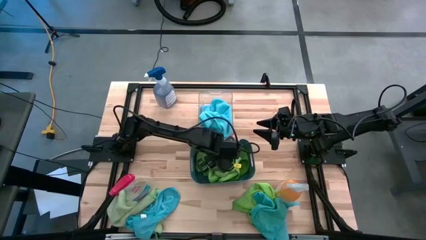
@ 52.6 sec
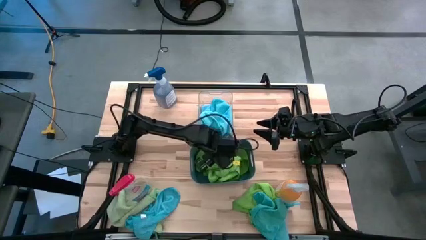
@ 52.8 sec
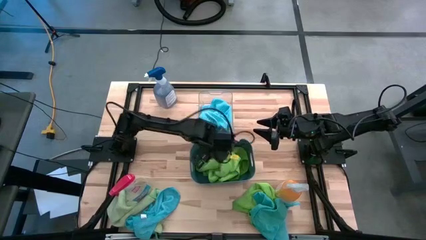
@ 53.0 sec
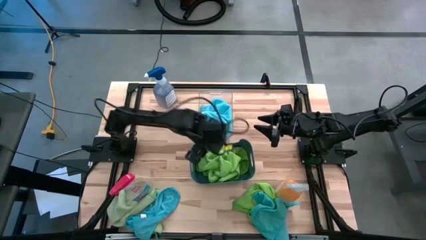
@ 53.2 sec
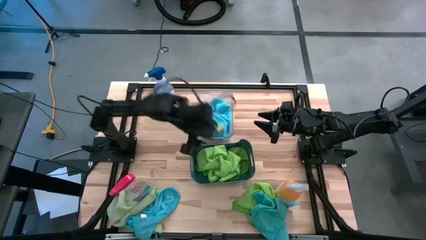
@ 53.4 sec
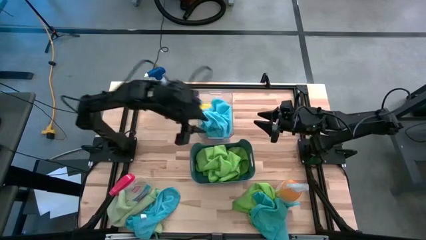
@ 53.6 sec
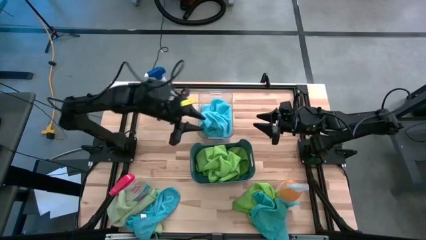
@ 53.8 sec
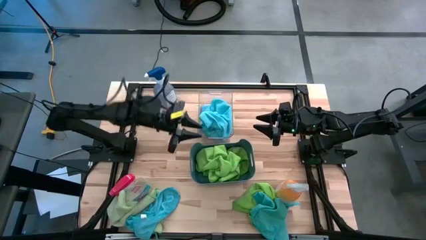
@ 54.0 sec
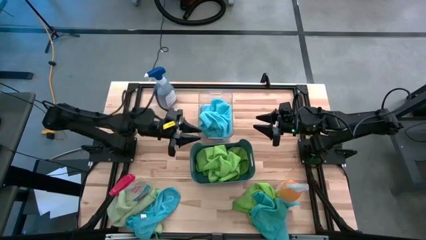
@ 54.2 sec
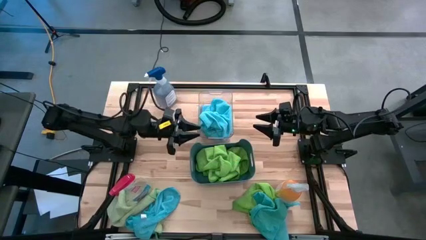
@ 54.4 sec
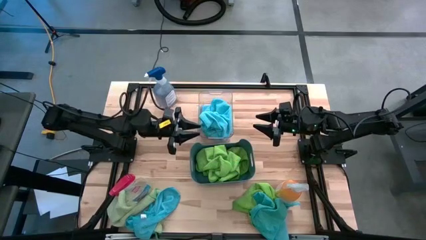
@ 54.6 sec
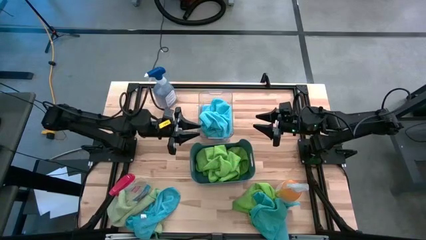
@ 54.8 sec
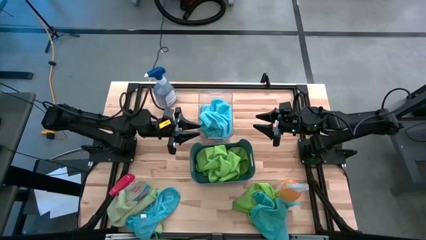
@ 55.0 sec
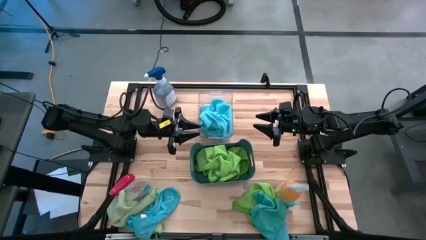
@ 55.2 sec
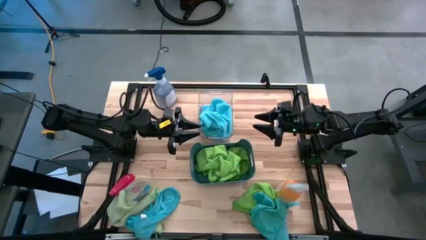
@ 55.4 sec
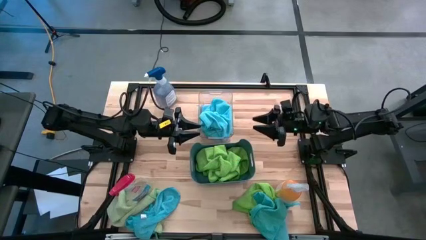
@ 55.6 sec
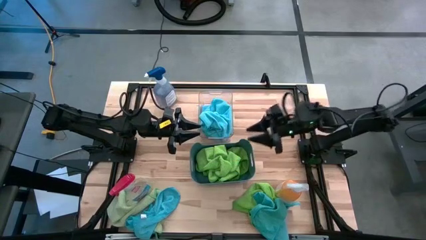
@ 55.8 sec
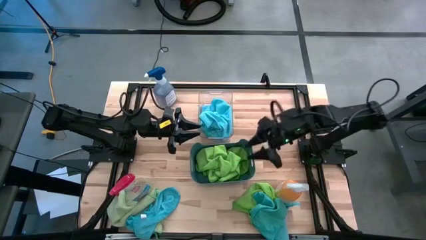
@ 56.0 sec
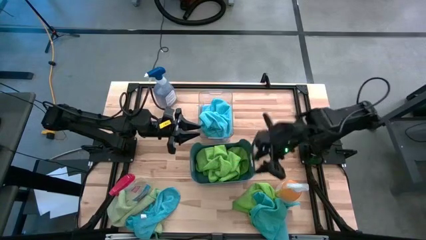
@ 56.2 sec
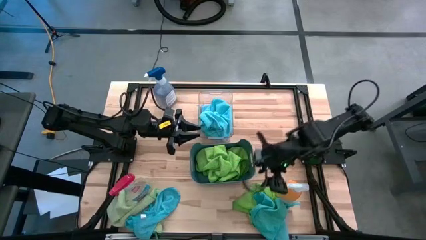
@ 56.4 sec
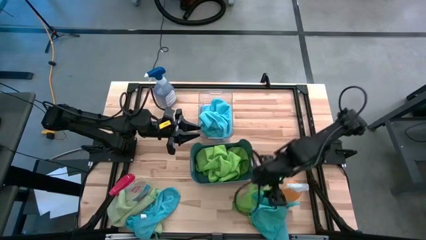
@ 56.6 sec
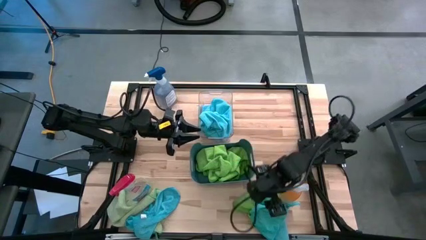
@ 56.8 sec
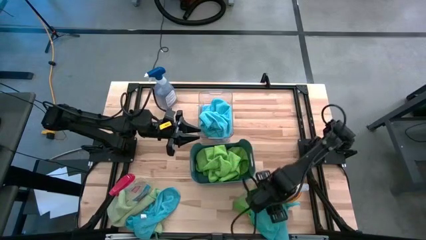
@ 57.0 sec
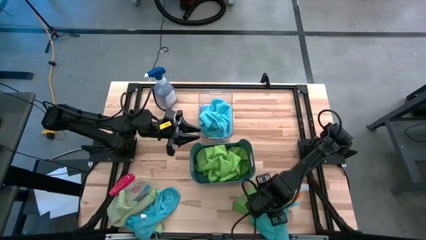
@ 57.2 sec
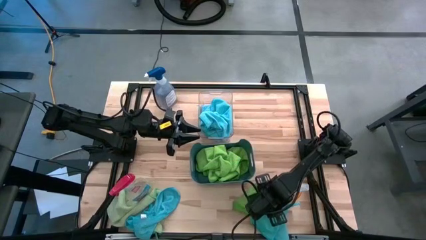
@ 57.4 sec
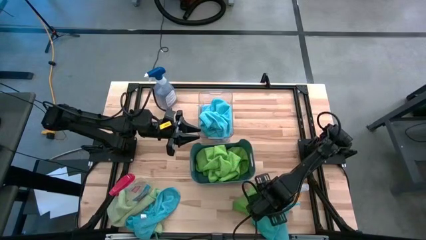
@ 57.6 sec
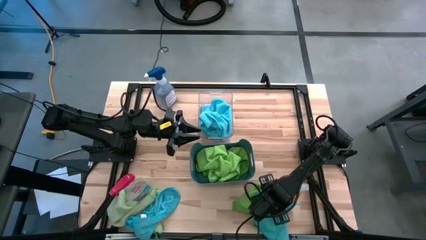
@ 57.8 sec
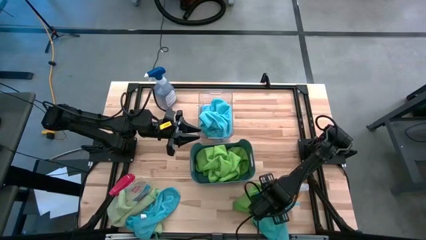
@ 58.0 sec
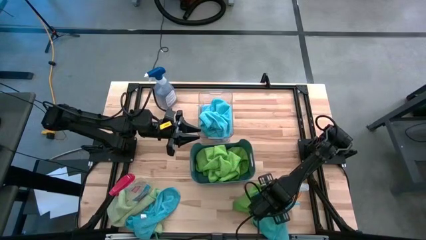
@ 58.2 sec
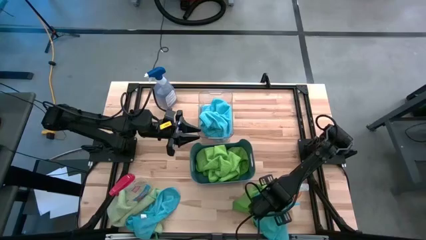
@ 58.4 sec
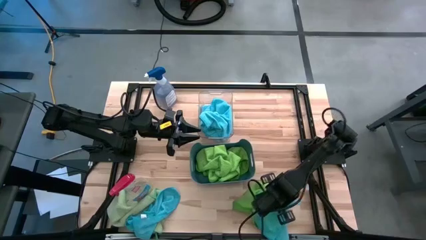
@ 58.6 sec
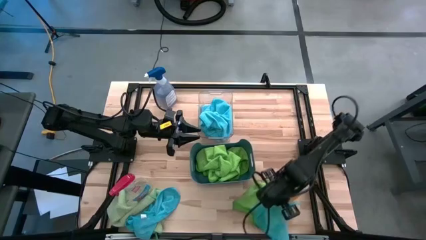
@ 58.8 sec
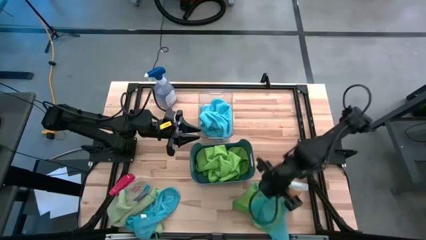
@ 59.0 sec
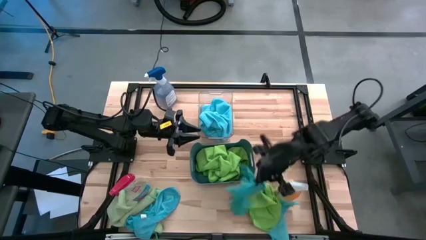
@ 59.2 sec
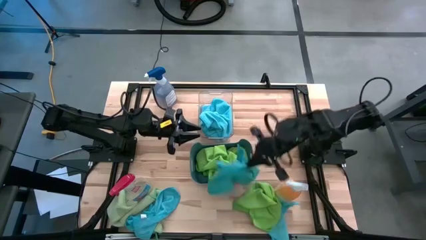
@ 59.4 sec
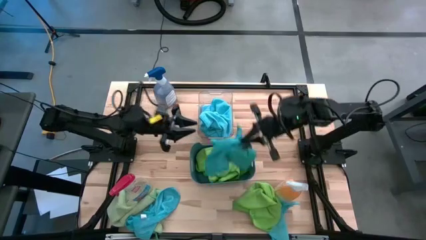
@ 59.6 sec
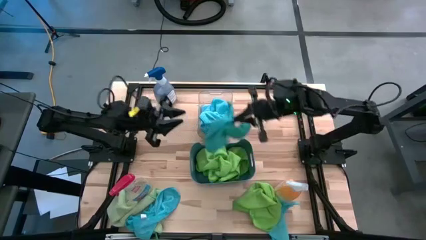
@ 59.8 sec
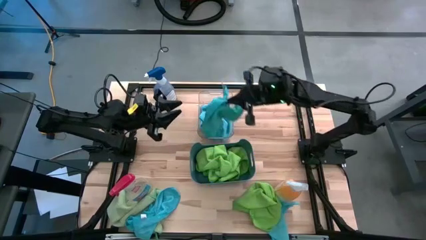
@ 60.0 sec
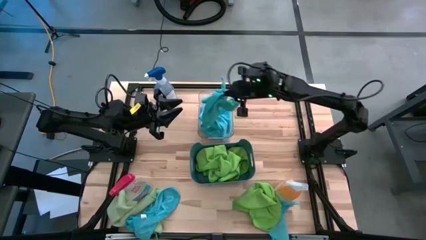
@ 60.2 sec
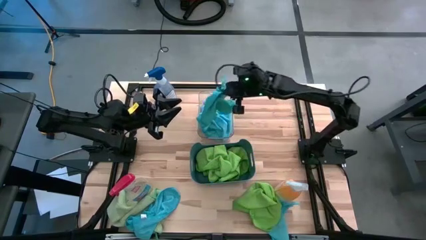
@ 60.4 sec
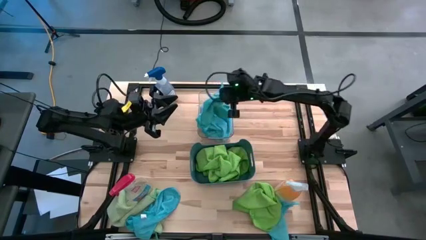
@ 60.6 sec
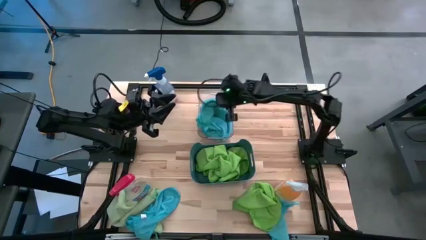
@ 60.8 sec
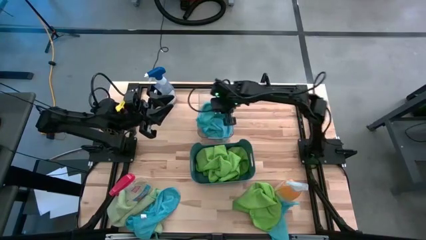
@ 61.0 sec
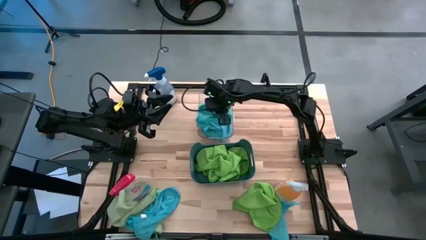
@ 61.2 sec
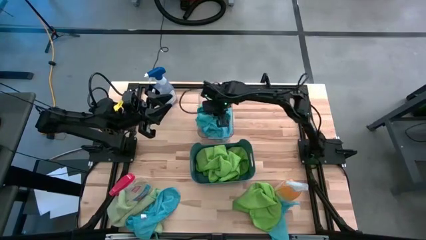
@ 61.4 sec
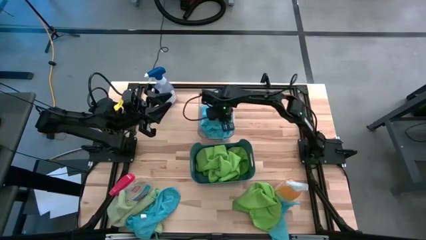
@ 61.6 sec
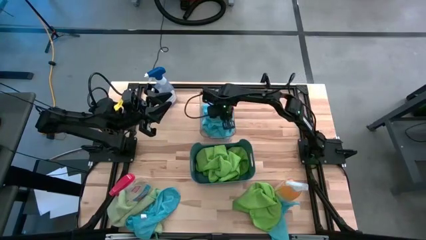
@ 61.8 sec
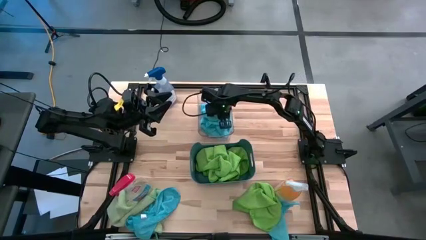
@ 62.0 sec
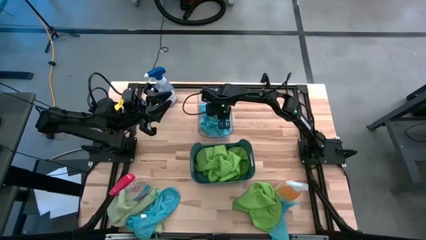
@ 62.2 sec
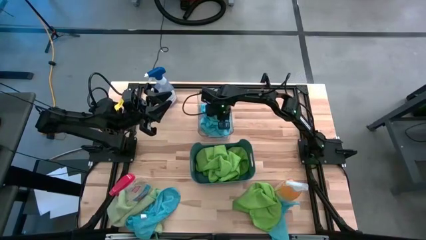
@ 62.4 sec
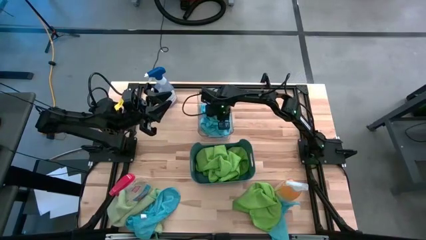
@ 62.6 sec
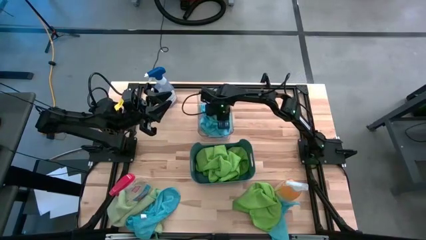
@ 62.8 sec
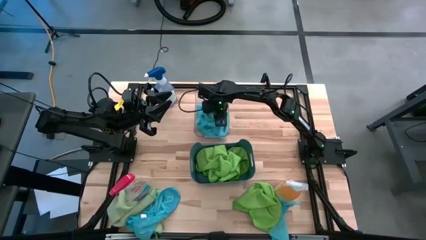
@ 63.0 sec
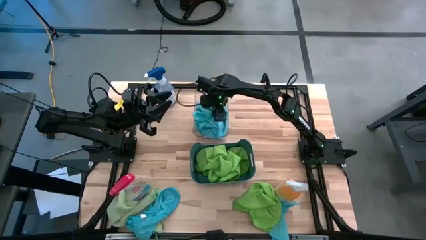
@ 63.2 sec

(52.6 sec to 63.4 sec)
Task: Sort microfiber towel by color & place in baskets
Put the blue microfiber towel into the transparent bin

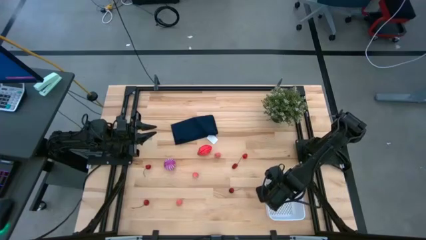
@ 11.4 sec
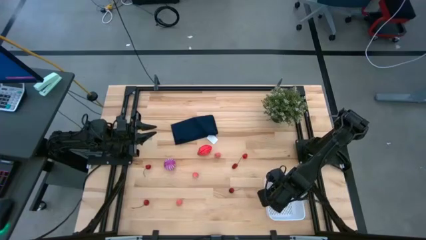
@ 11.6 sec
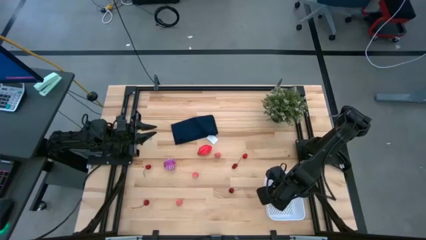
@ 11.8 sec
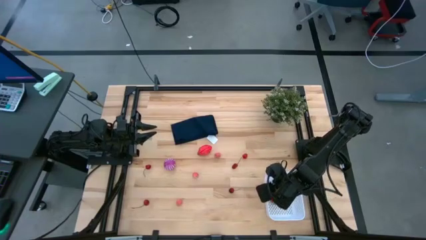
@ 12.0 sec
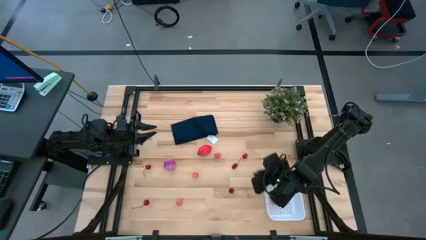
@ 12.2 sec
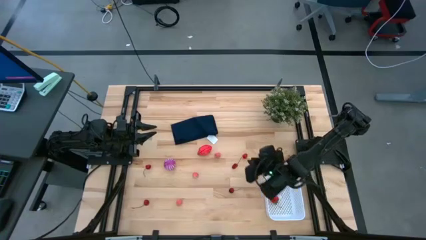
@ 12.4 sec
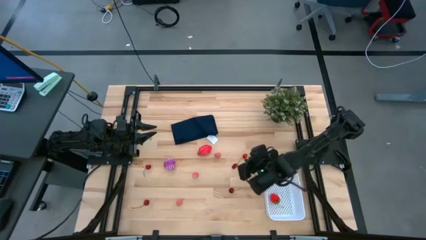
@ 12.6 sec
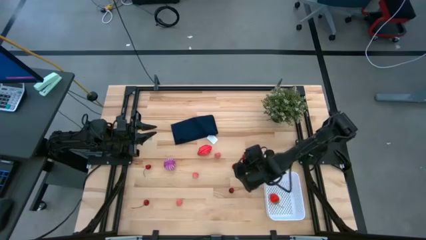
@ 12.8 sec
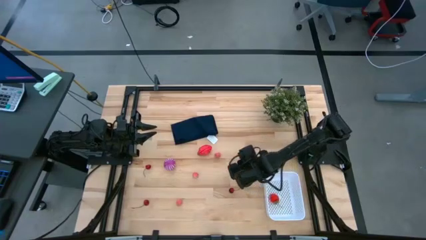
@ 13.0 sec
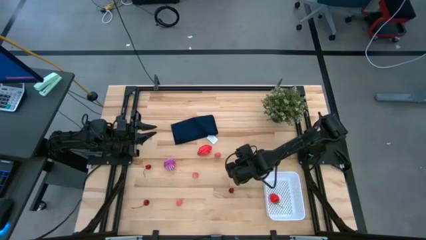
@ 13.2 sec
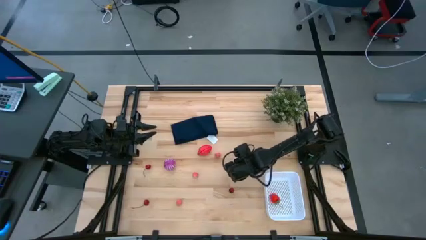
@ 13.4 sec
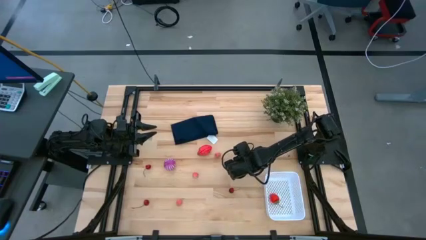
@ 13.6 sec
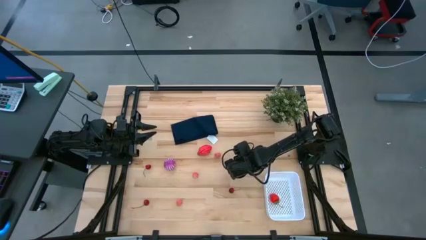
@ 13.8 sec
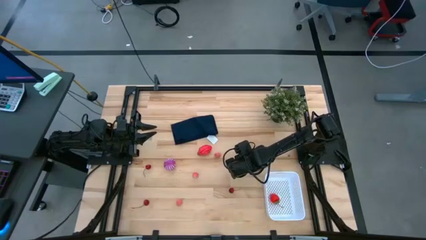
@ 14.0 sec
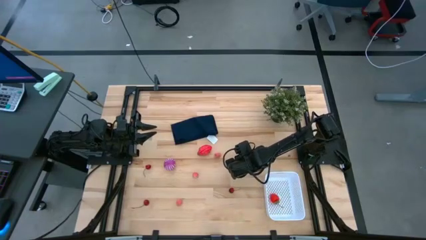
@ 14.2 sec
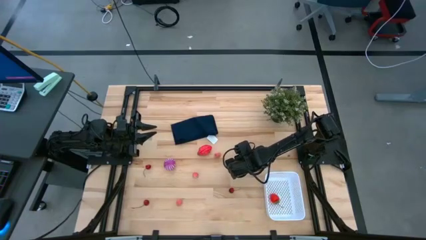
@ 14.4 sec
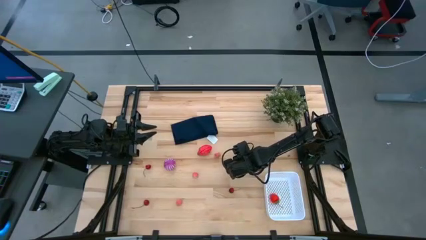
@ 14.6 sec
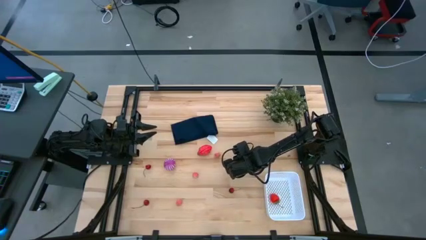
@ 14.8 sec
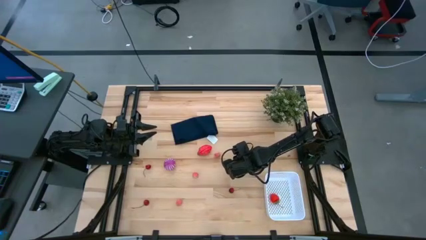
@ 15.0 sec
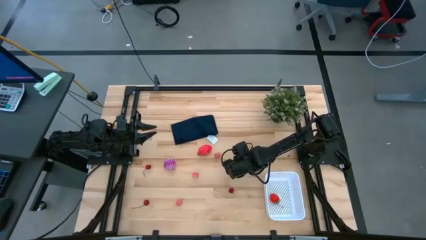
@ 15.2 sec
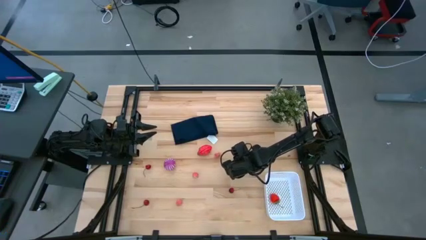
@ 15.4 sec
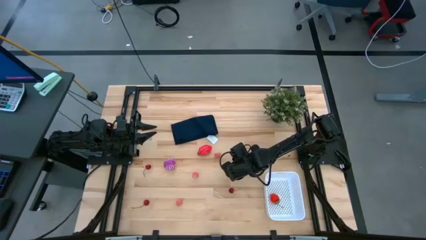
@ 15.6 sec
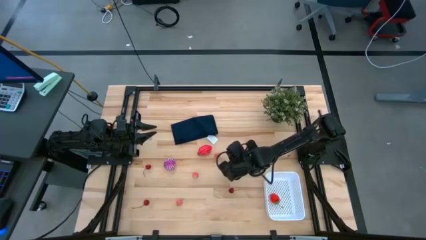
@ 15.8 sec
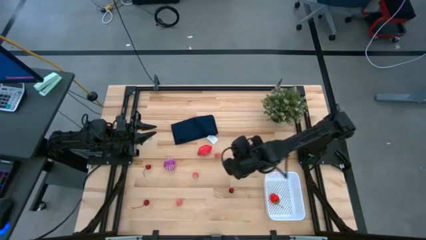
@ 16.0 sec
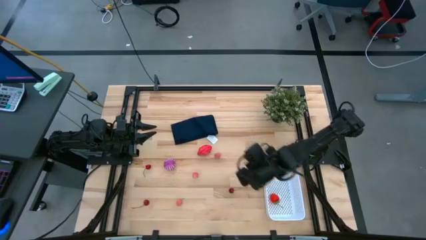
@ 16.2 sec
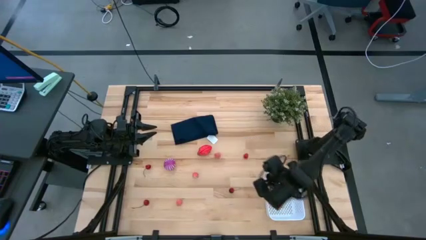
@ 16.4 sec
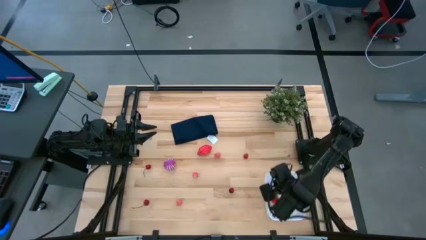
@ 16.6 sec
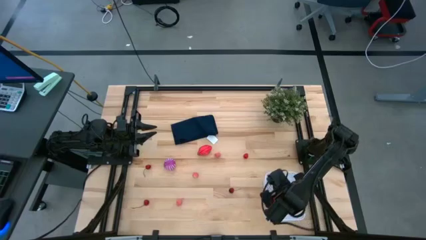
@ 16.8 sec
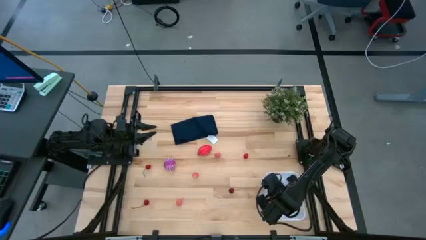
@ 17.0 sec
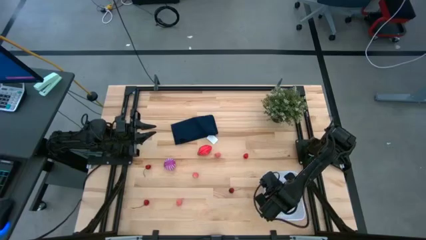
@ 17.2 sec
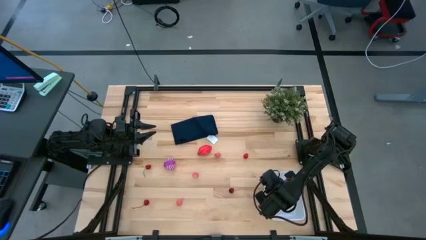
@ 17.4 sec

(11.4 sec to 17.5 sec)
Task: Pick and placing Produce into tupperware
Put the cherry into the white bin
